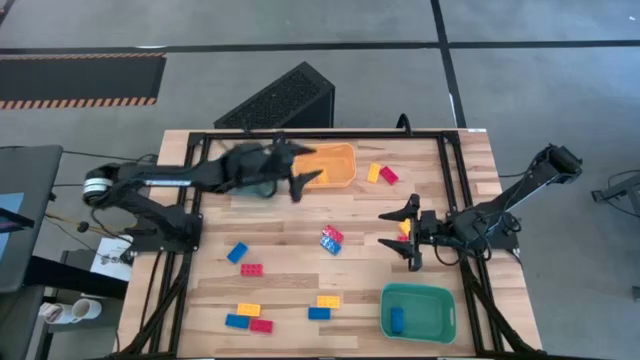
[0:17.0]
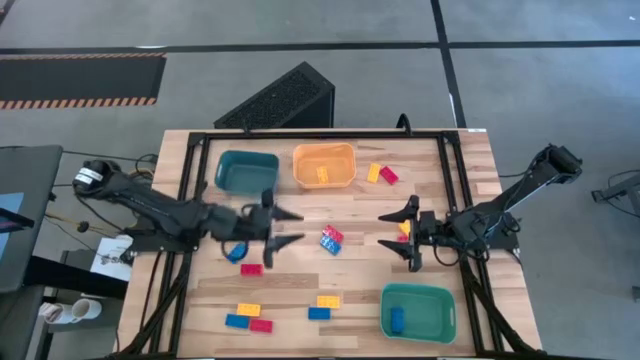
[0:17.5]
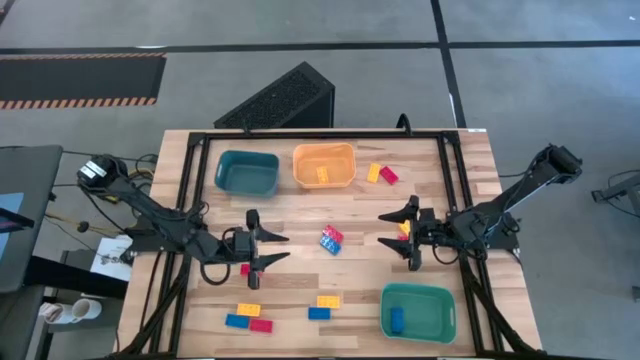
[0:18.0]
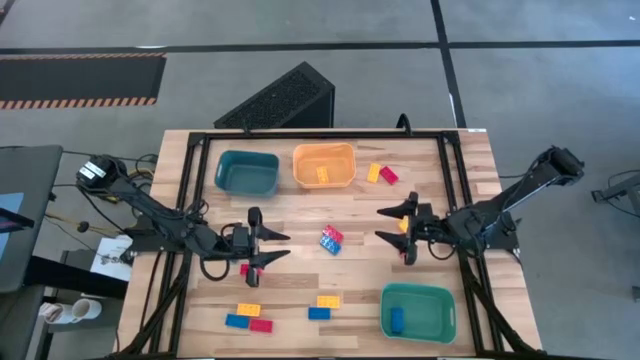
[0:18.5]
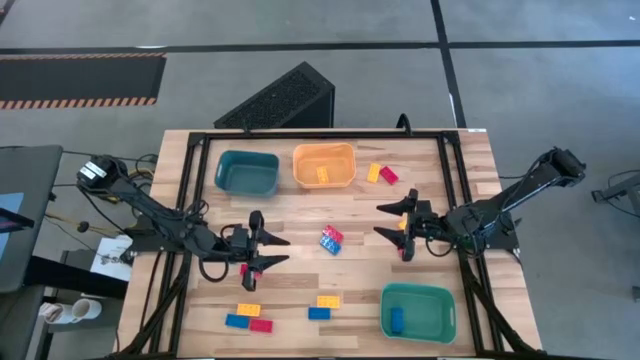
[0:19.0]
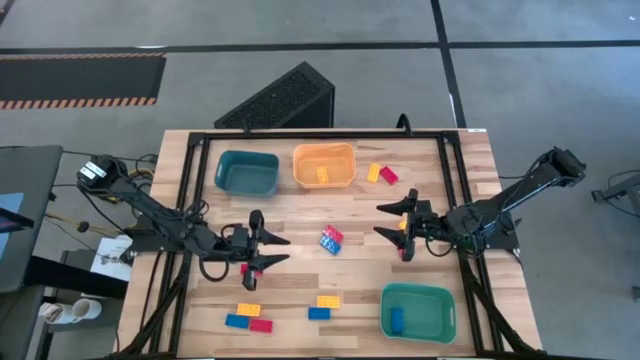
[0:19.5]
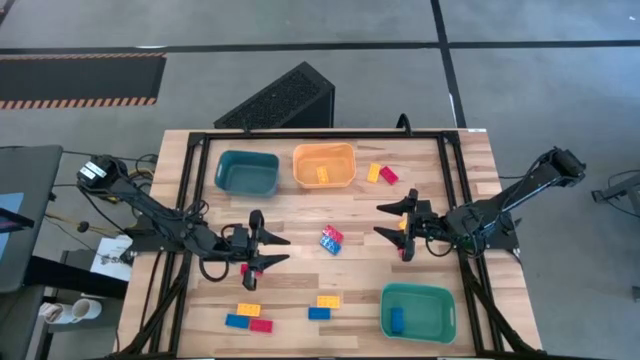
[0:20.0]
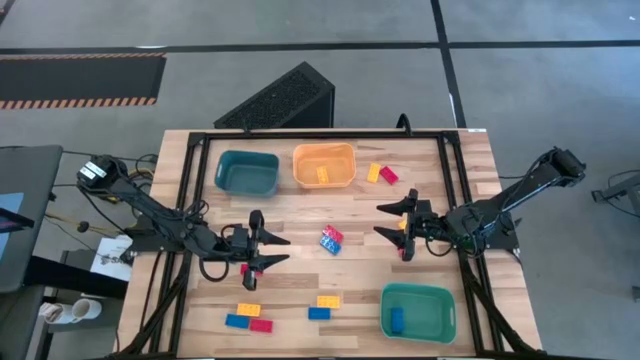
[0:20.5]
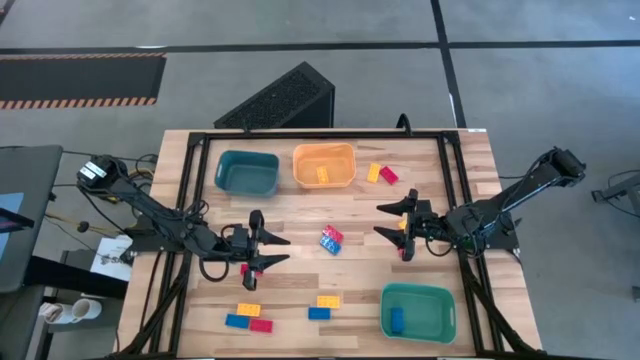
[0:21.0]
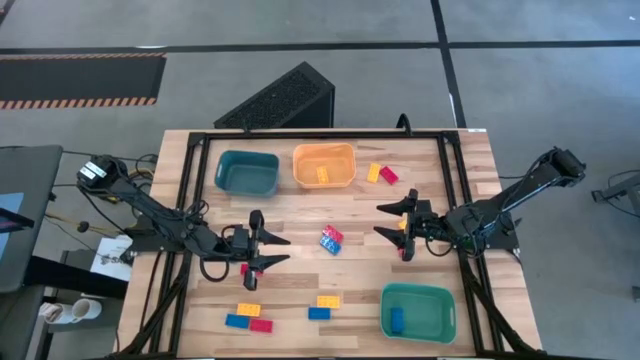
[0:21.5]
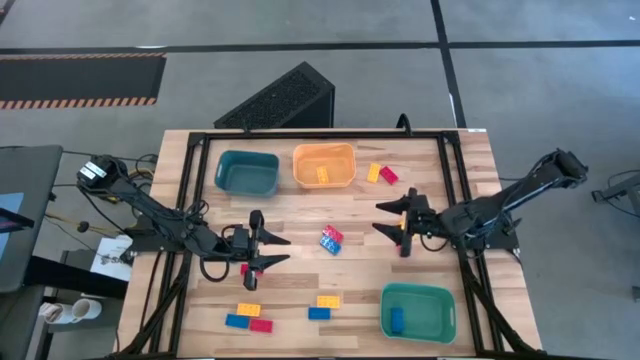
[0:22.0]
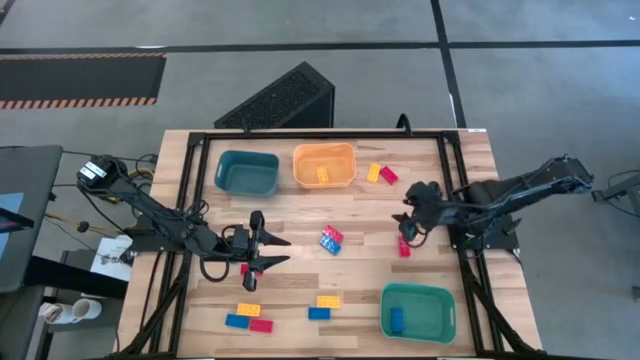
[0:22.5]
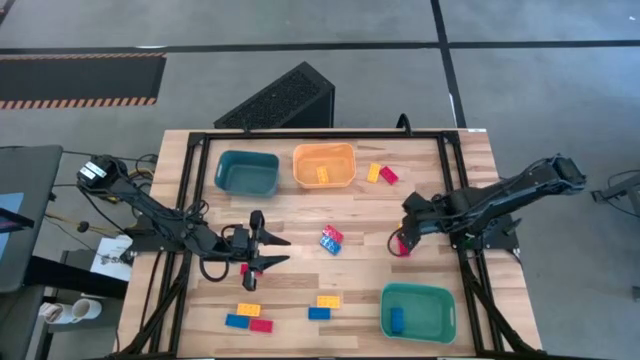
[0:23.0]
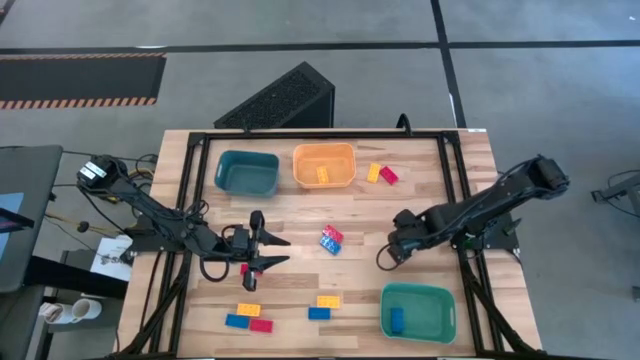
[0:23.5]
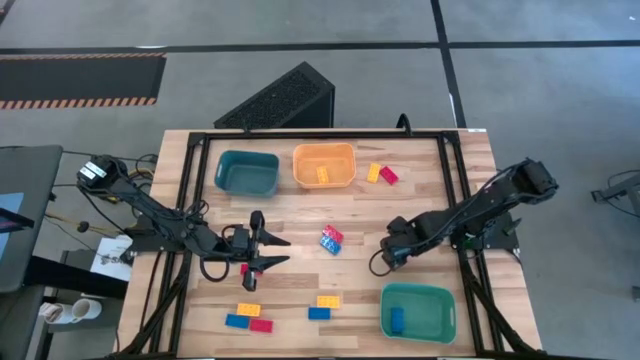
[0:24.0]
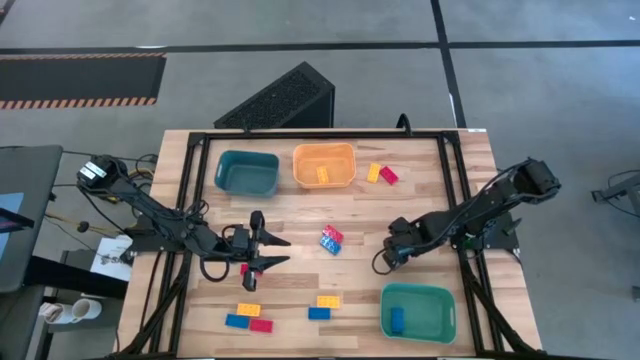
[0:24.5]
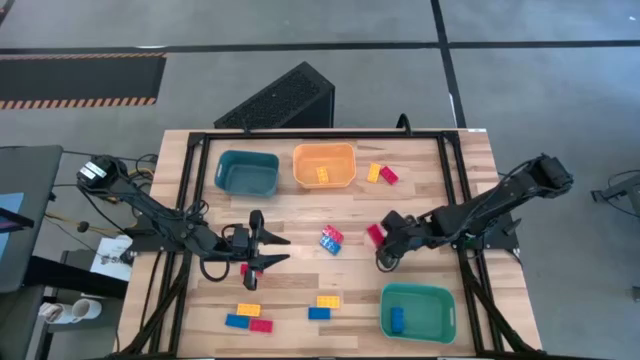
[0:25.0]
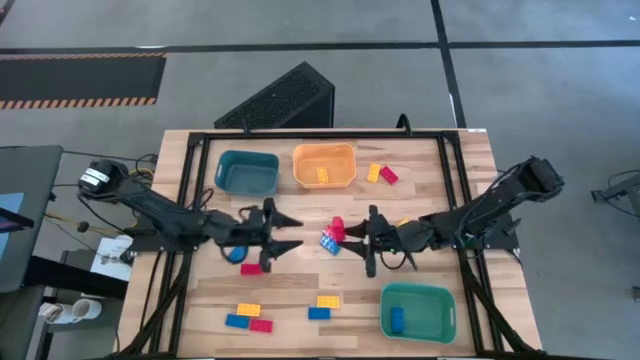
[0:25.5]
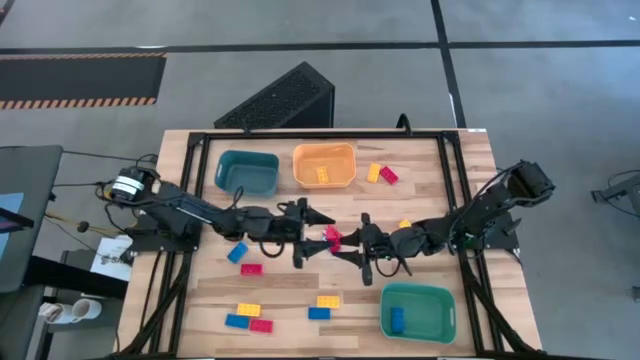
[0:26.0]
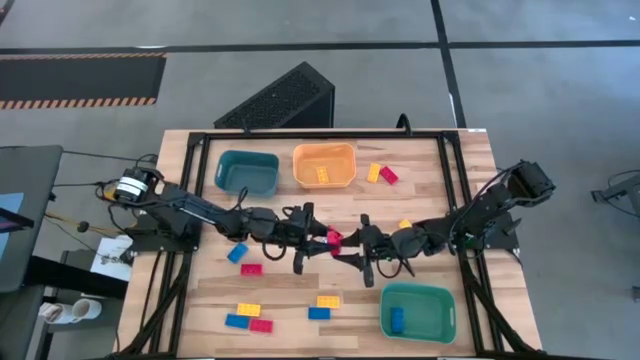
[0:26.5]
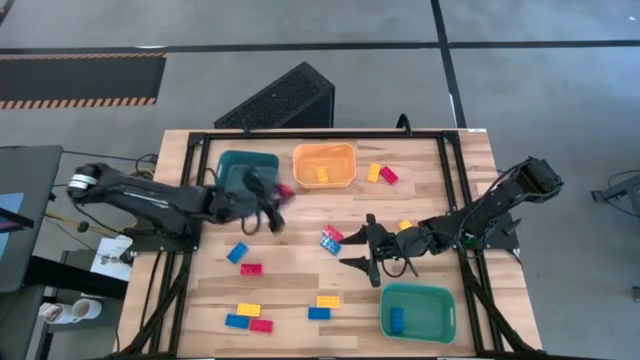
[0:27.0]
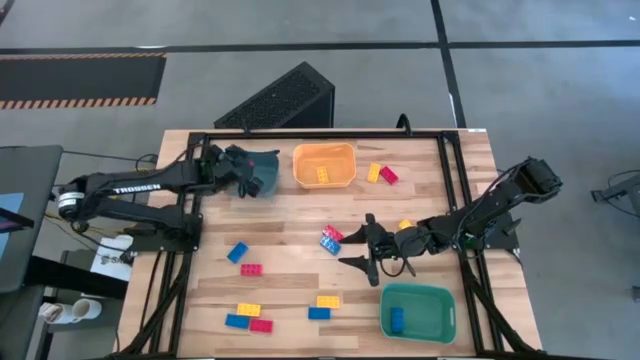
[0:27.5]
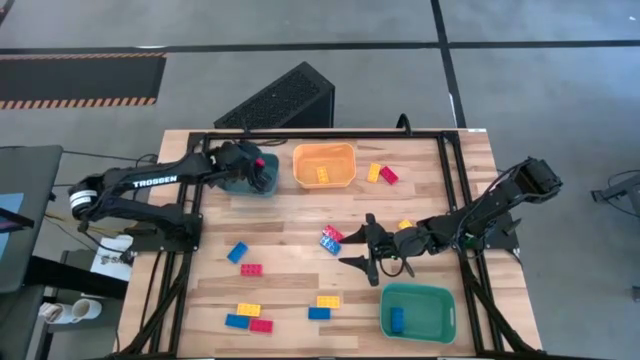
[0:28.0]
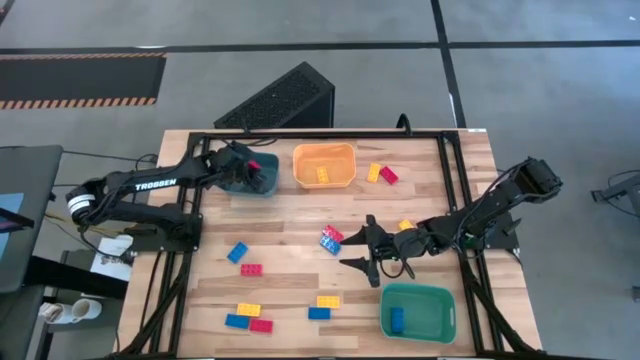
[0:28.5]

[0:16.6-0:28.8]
Task: Sort & place blocks by color
Put the red game piece into the blue bin

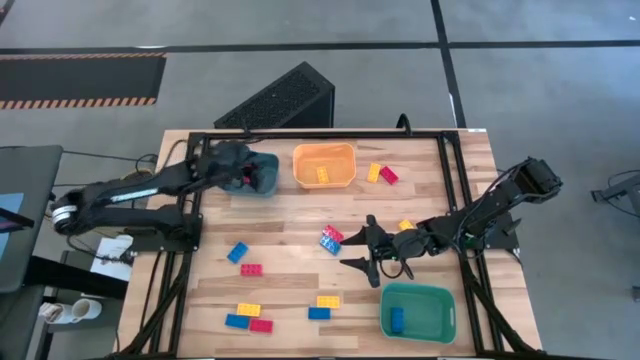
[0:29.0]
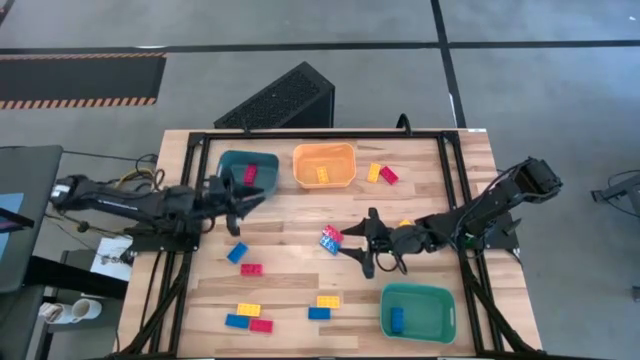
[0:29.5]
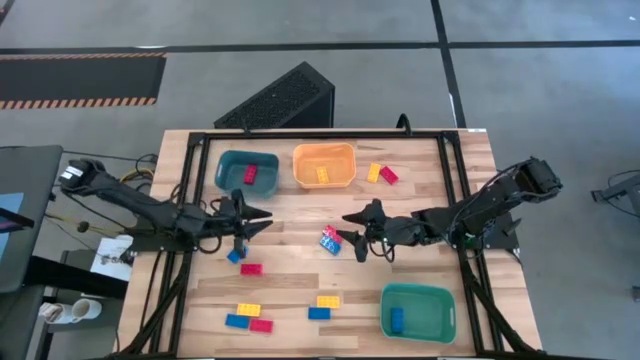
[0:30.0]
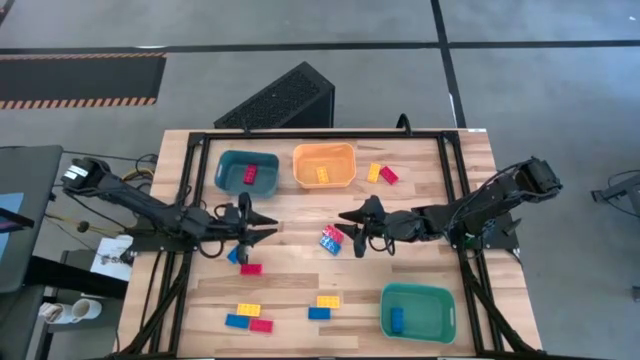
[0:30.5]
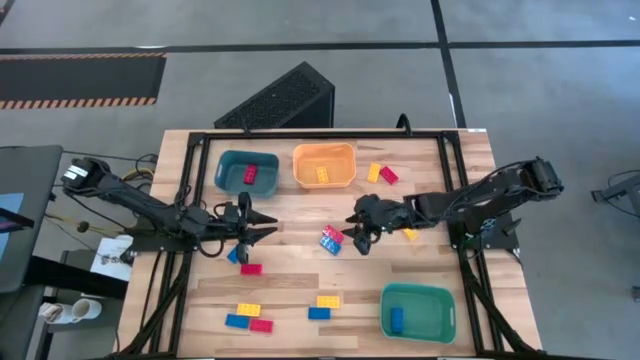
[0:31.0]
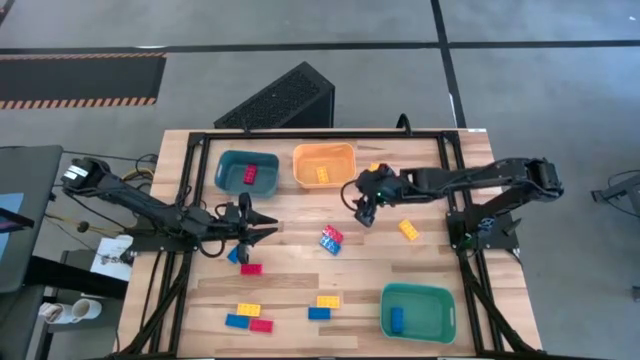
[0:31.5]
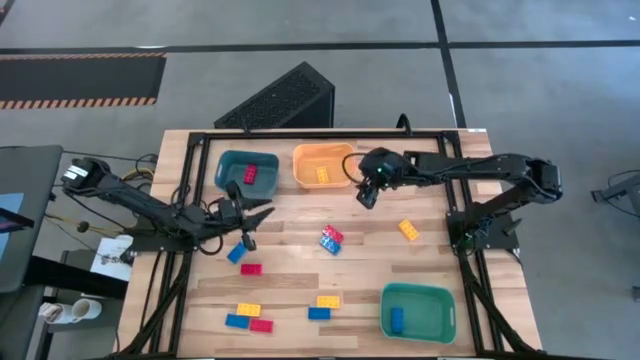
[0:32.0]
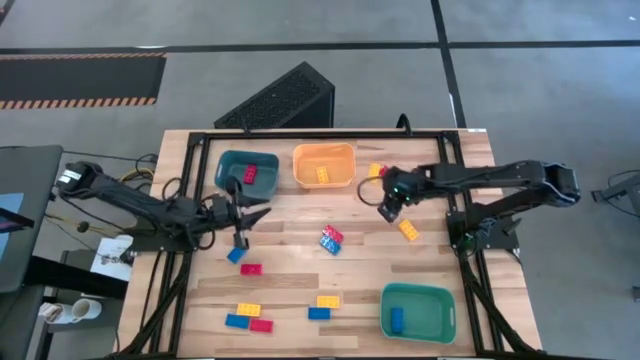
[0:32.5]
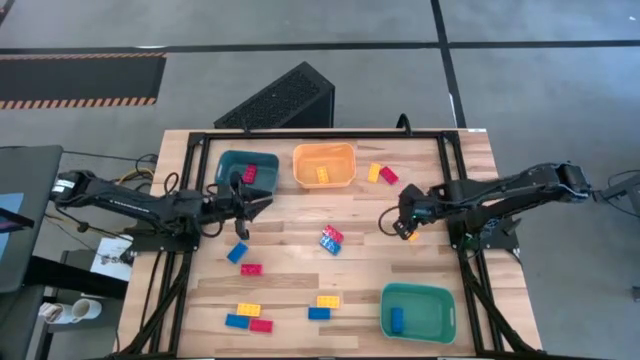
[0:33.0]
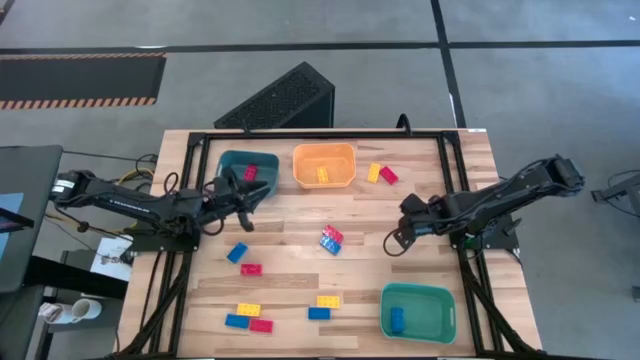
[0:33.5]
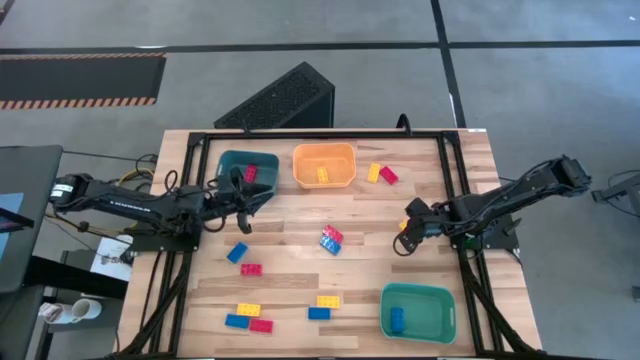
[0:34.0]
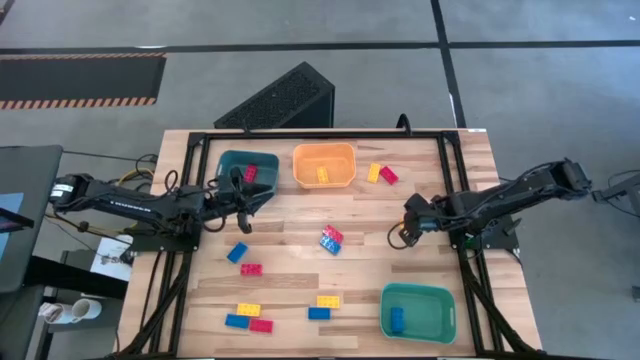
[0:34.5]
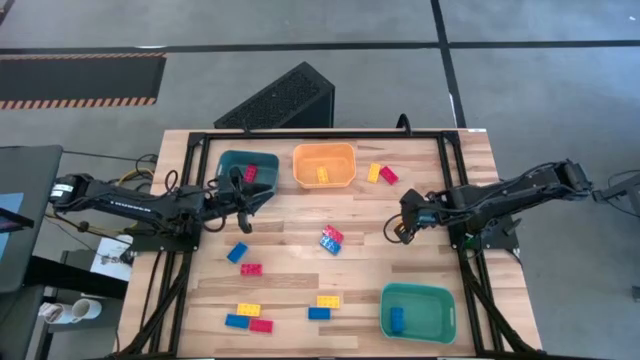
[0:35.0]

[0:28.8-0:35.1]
Put the yellow game piece into the yellow bin

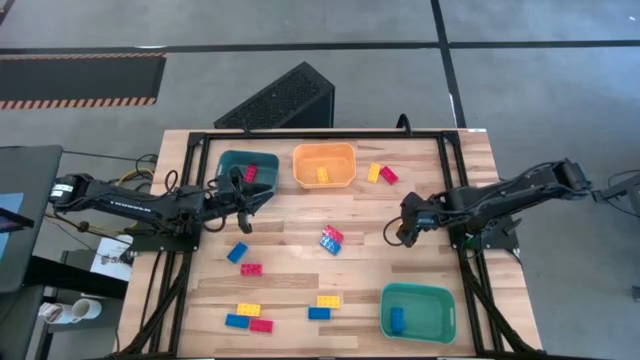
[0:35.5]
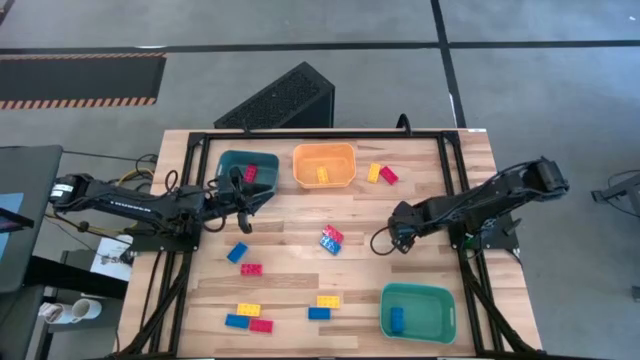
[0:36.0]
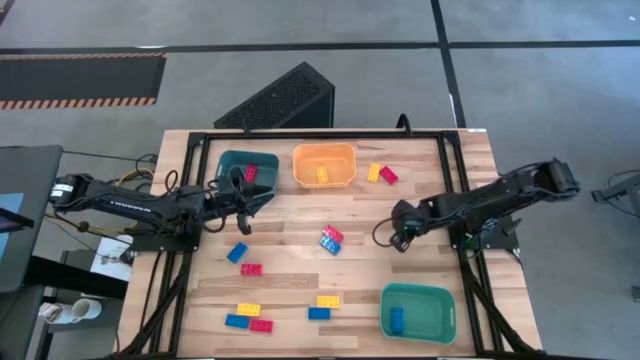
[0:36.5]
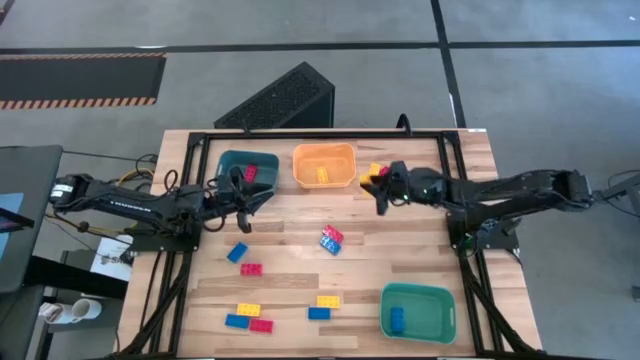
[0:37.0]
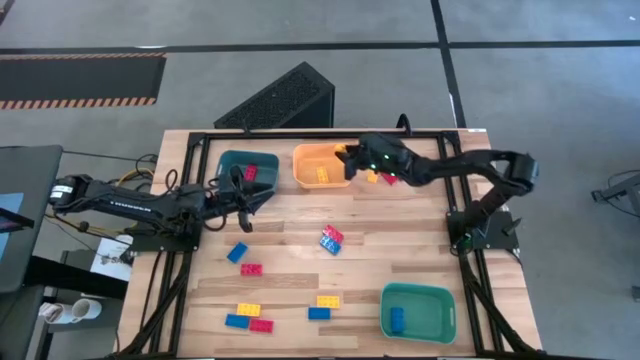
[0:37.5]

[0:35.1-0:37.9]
Put the yellow game piece into the yellow bin
